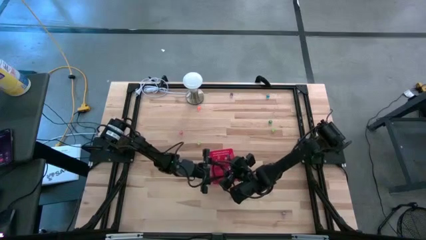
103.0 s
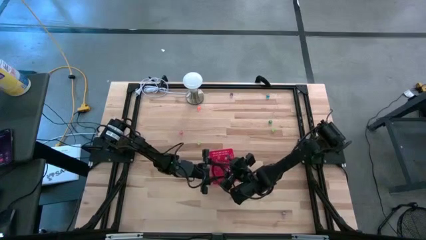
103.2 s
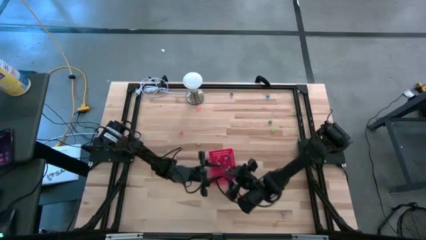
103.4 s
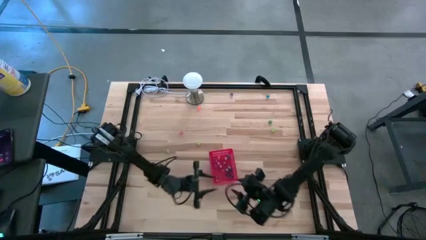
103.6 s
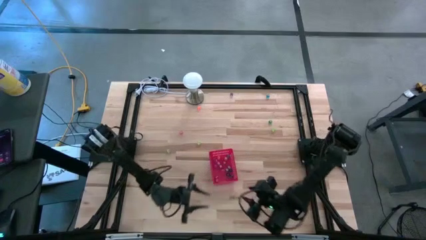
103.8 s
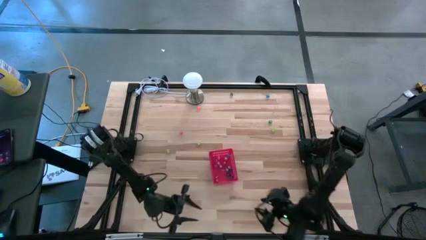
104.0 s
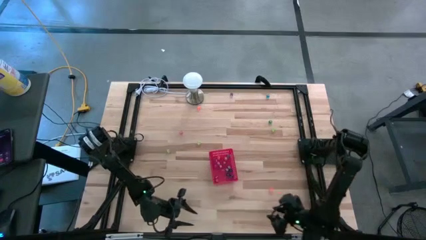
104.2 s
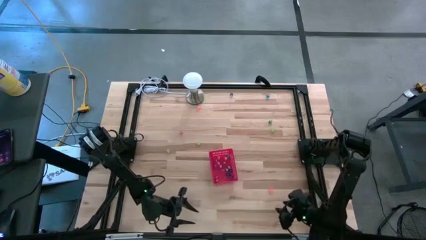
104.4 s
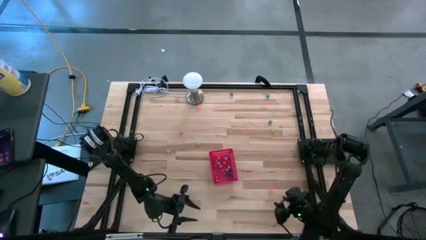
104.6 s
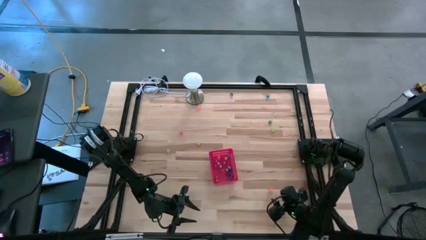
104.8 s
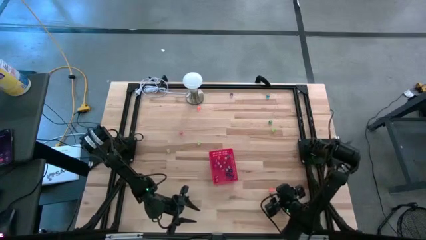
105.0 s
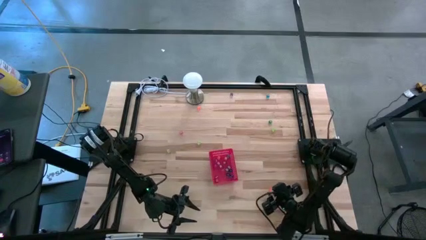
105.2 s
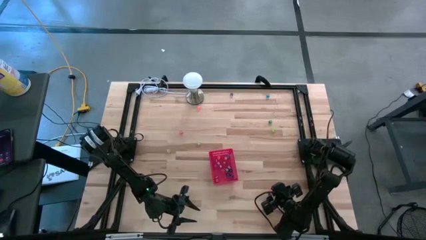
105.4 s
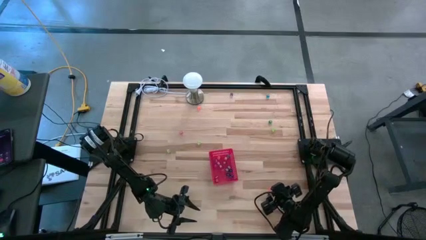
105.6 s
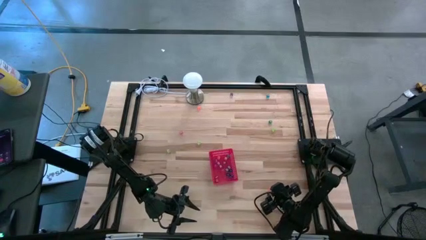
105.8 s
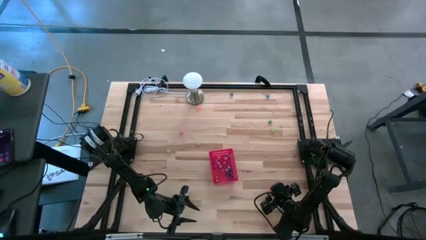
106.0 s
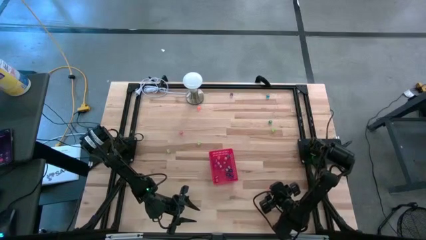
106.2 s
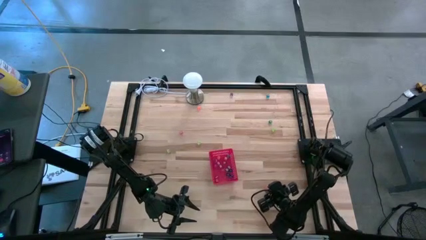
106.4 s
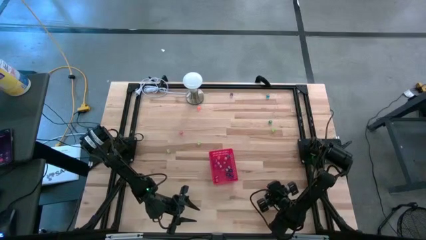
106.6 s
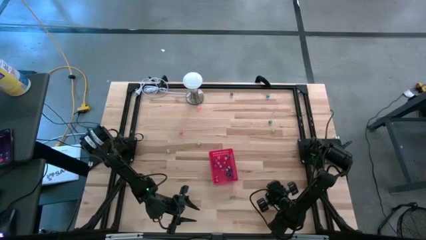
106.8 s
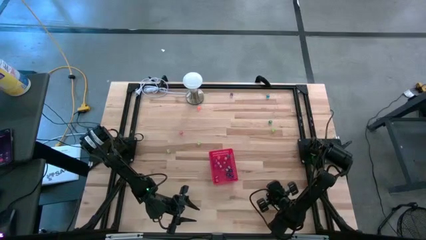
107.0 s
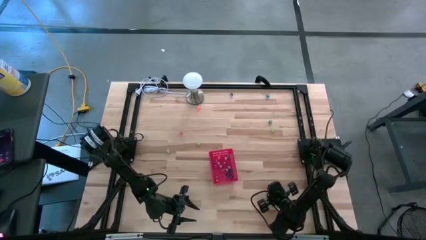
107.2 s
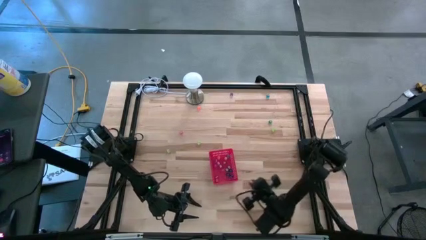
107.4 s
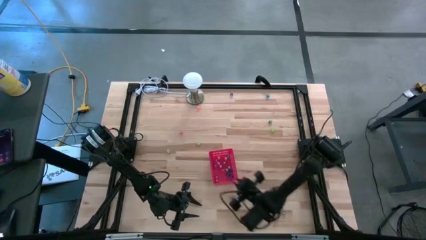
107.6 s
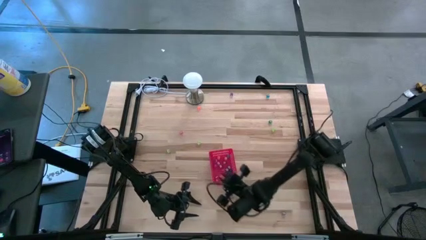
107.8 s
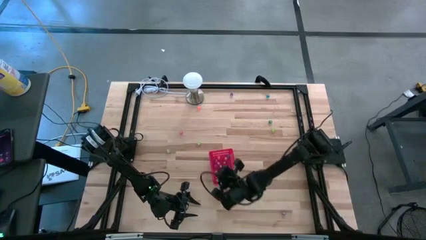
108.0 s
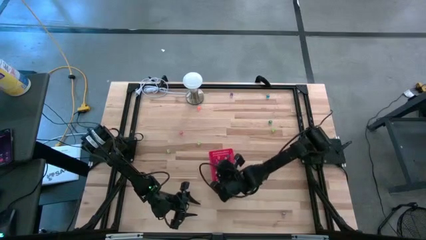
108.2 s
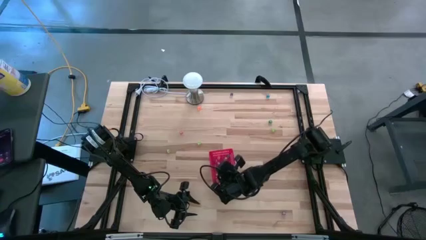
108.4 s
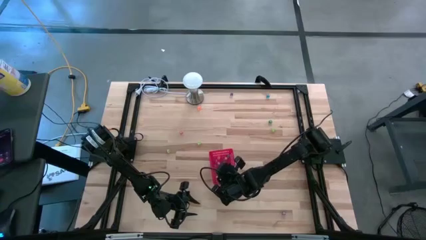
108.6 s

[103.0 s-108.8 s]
Task: Pick & Place Dice
Put the orange die into the red basket

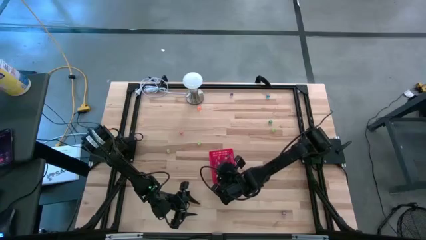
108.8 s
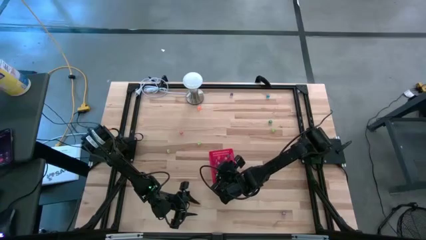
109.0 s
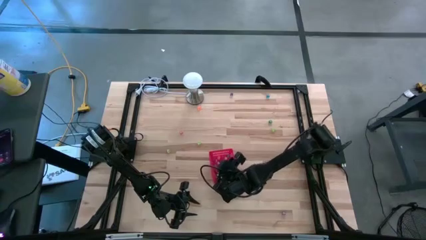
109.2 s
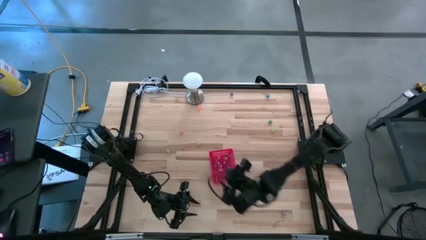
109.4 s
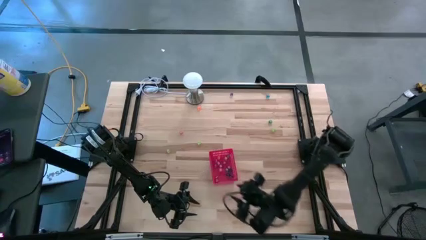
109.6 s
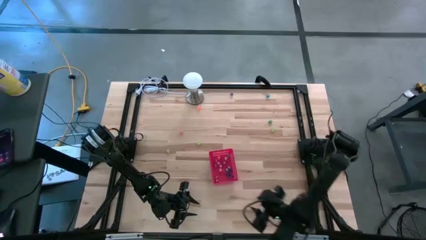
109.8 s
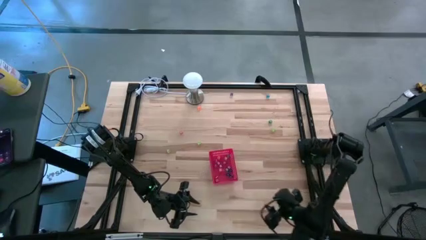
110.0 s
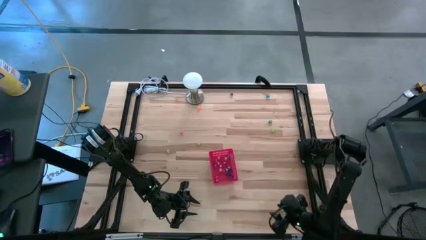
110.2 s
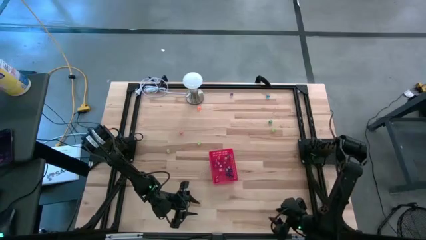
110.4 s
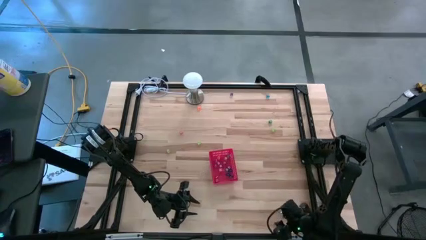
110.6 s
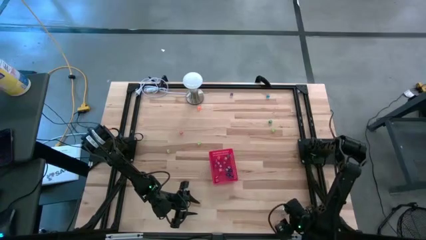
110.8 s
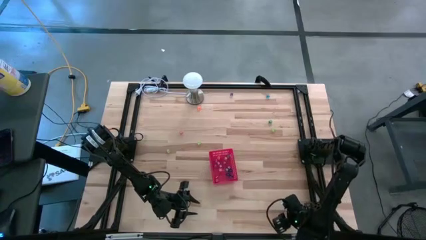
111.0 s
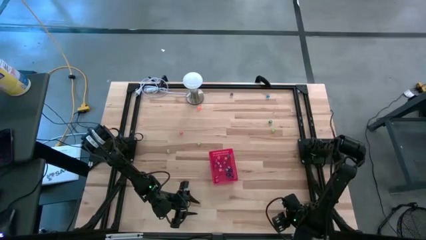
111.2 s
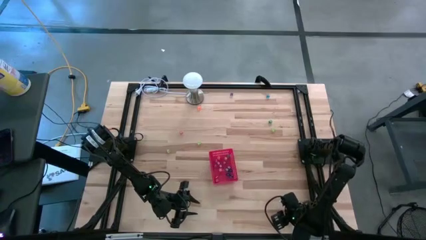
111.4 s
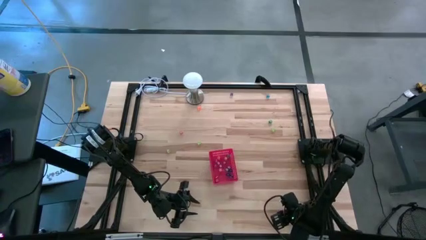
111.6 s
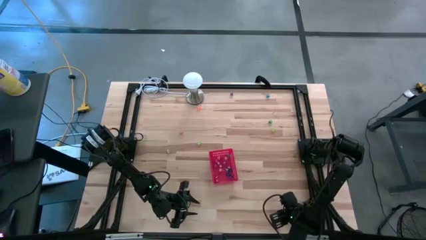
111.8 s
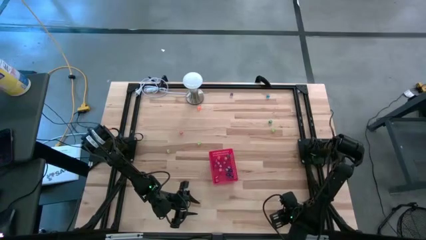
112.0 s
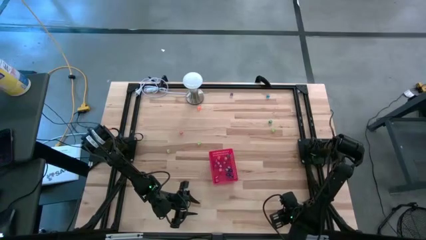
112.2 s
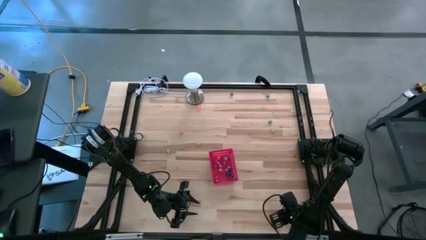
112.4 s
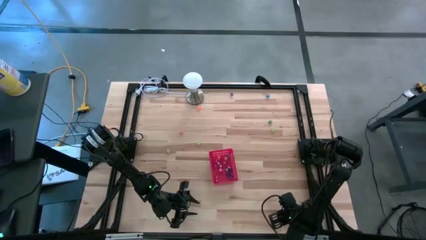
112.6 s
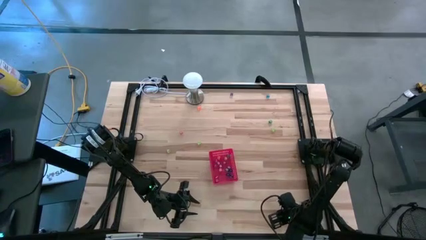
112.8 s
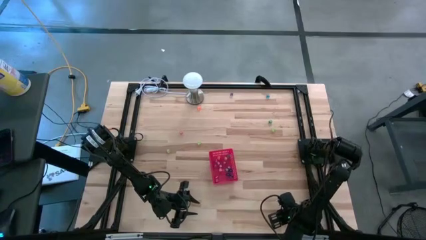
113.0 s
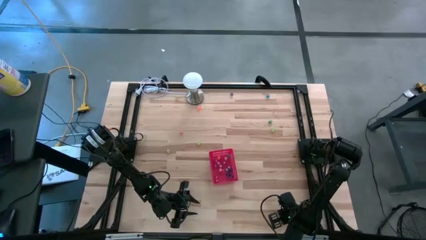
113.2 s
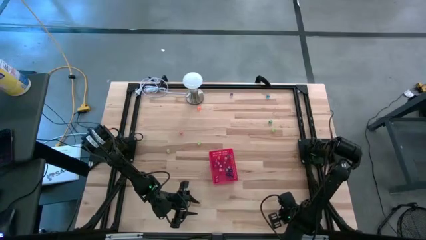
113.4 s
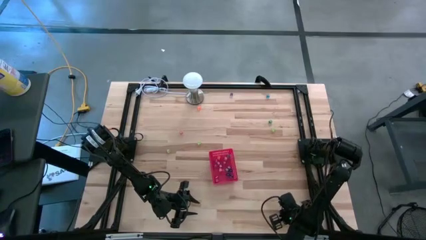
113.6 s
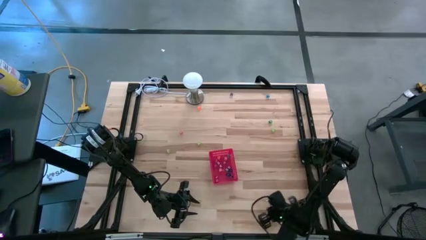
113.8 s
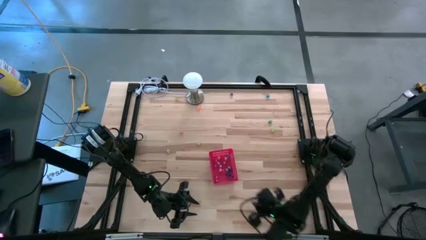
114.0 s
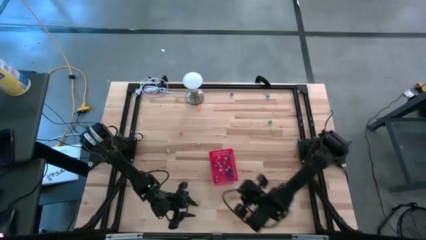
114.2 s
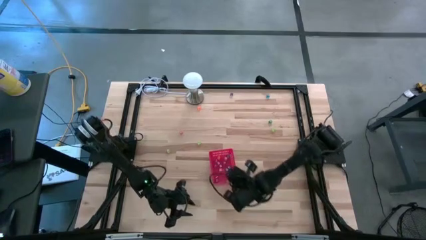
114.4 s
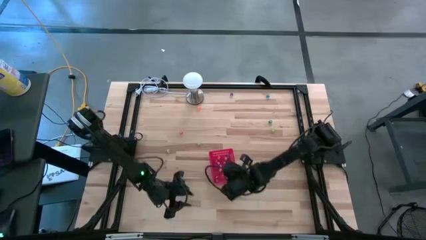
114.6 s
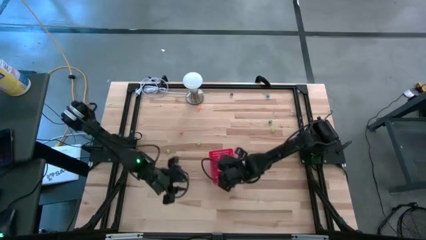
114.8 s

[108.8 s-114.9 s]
Put the purple die into the red basket

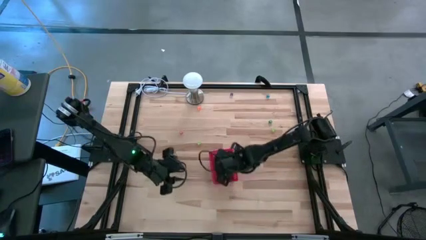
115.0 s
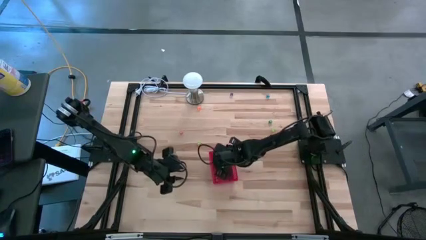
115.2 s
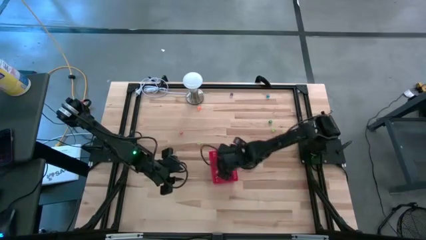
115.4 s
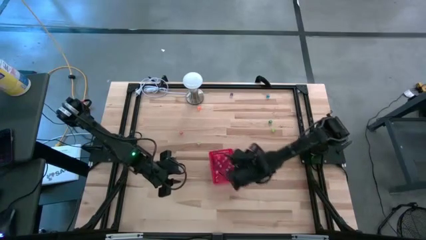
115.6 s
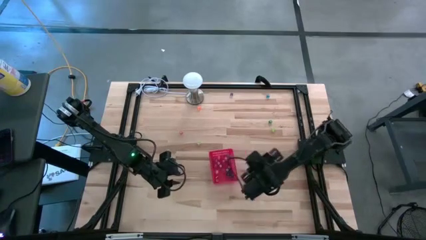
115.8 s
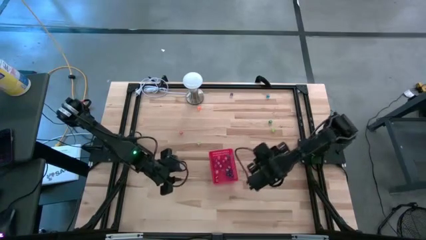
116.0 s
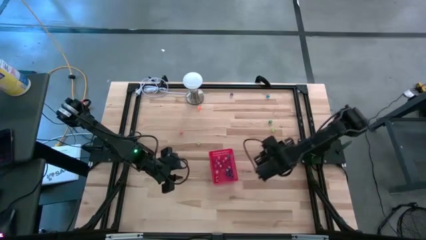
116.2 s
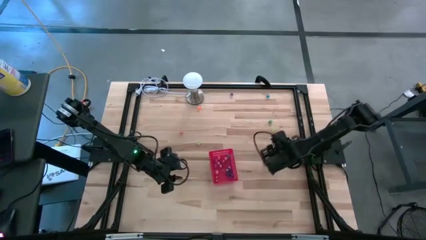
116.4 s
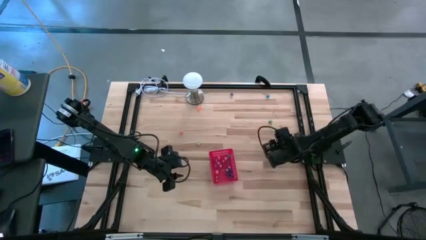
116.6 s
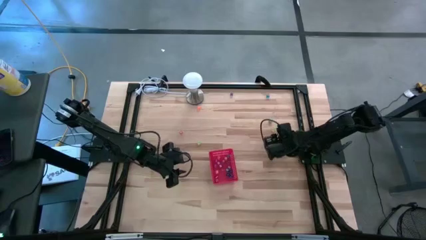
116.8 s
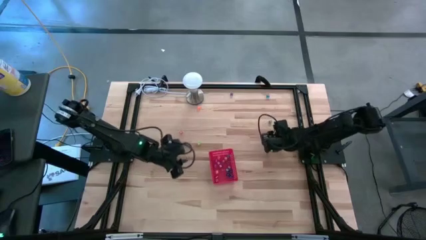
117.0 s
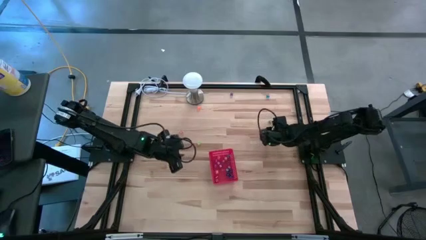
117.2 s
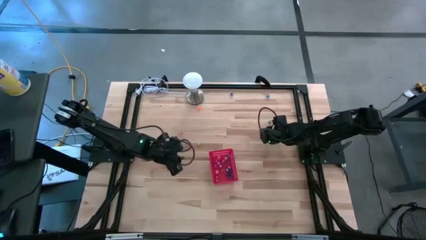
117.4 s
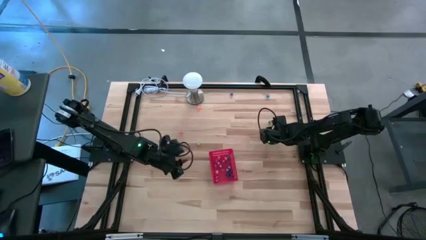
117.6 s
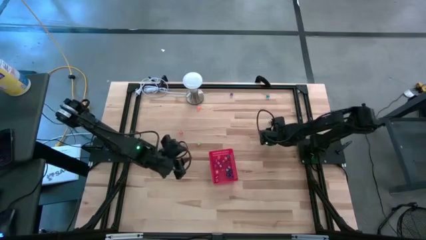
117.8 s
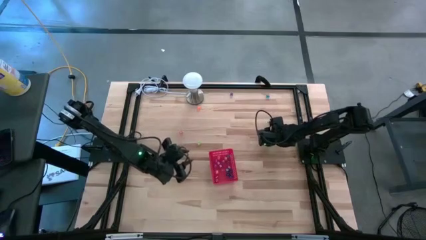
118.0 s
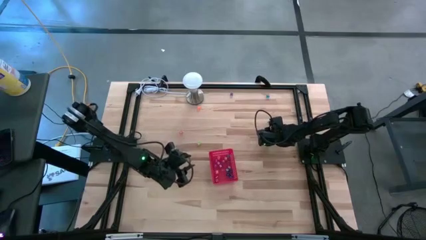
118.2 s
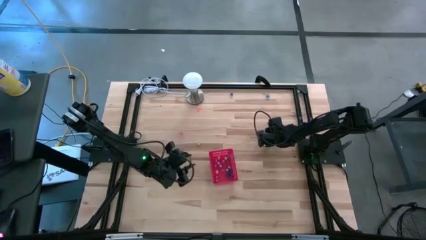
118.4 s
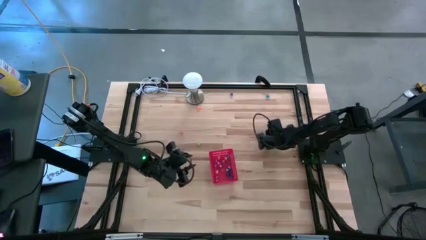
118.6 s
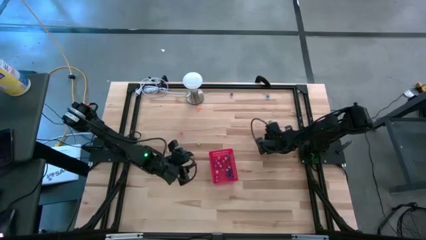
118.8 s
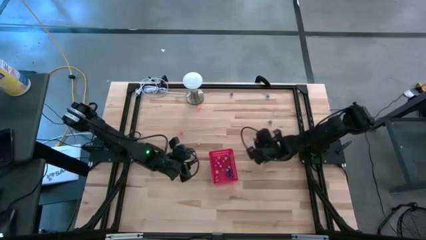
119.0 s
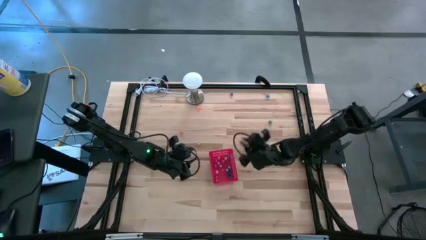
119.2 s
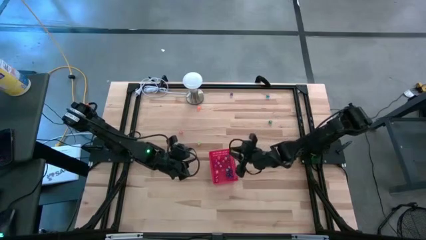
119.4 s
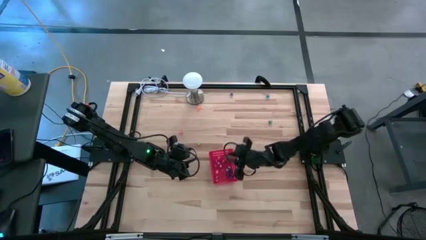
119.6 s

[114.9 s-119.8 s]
Put the light green die into the red basket
